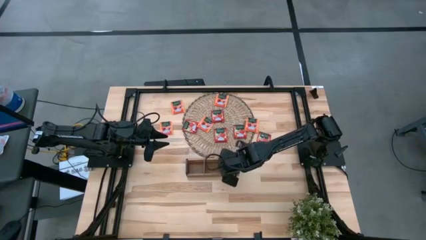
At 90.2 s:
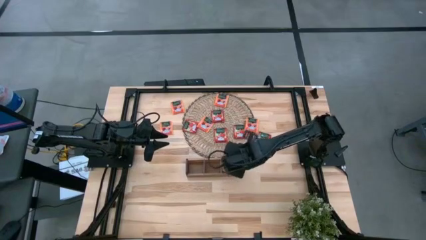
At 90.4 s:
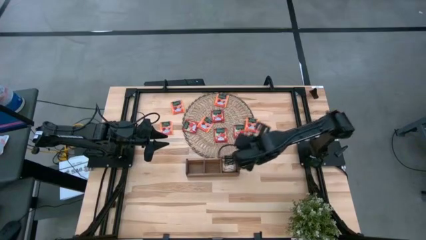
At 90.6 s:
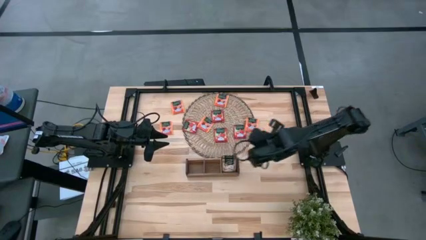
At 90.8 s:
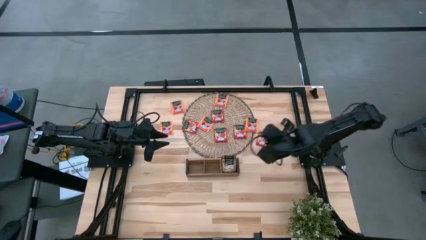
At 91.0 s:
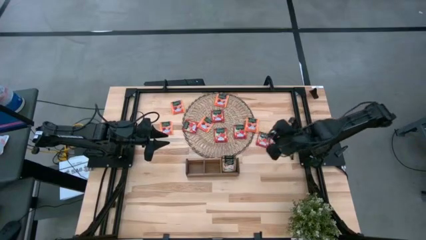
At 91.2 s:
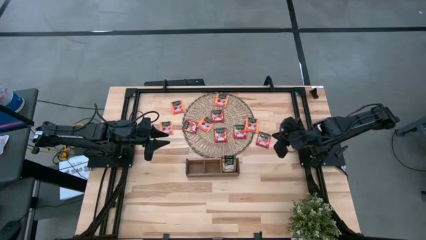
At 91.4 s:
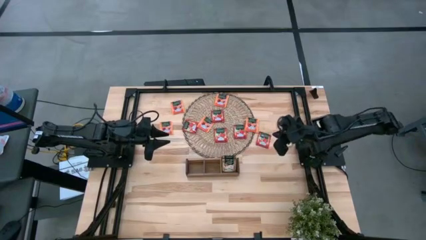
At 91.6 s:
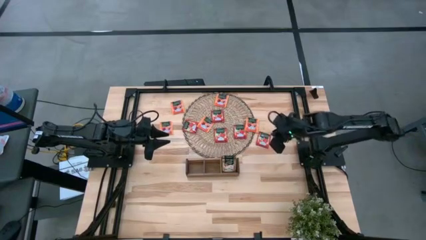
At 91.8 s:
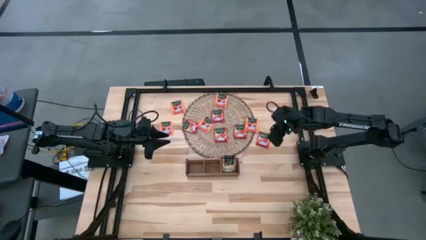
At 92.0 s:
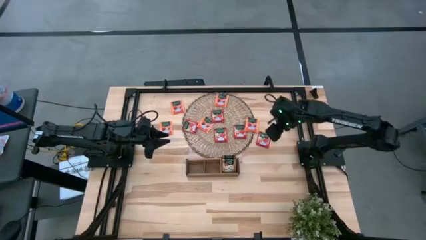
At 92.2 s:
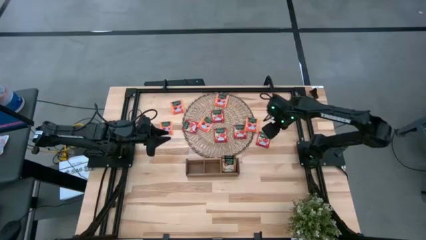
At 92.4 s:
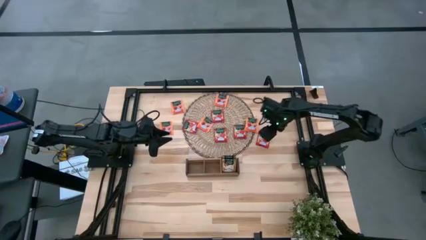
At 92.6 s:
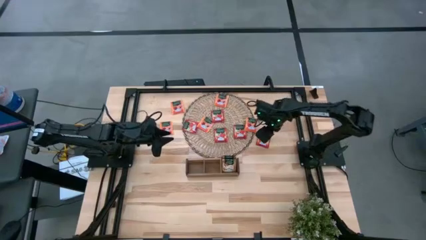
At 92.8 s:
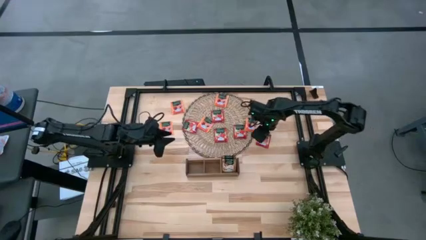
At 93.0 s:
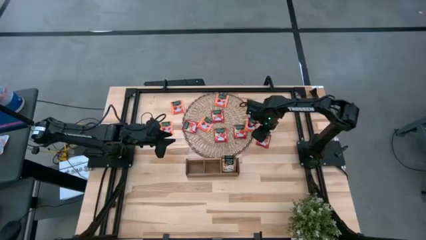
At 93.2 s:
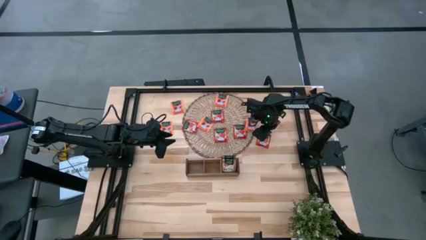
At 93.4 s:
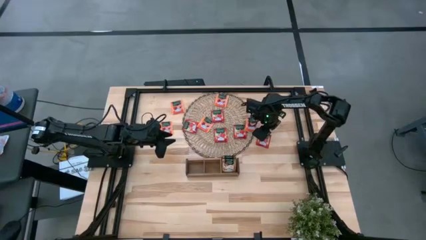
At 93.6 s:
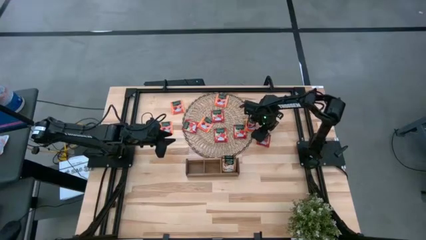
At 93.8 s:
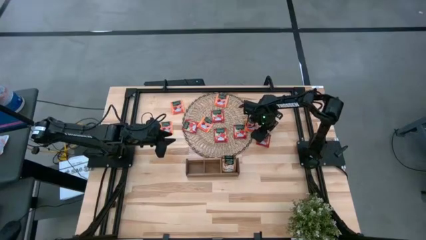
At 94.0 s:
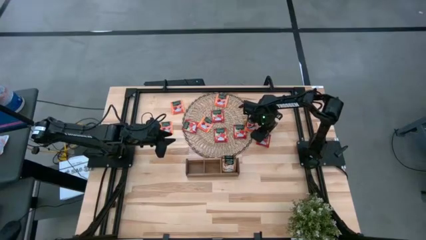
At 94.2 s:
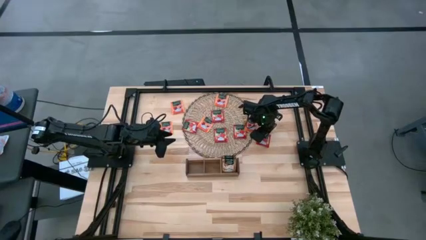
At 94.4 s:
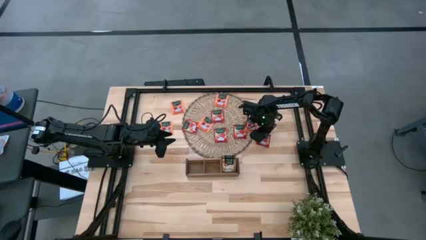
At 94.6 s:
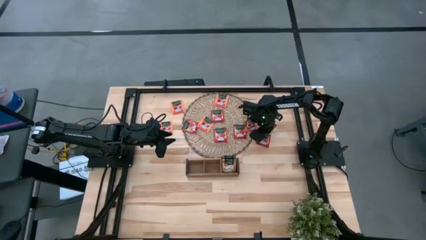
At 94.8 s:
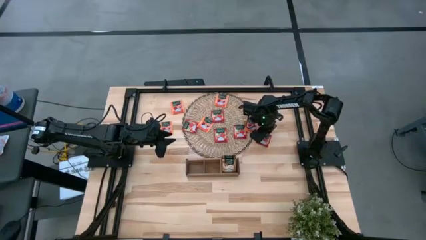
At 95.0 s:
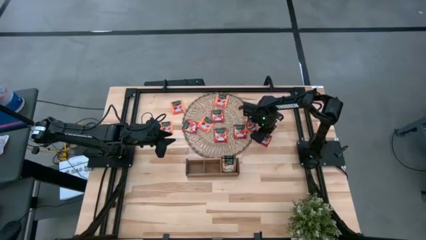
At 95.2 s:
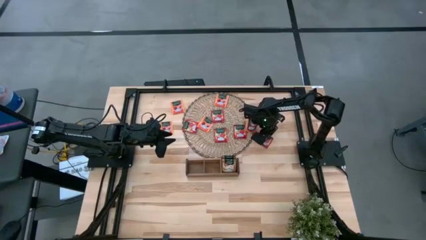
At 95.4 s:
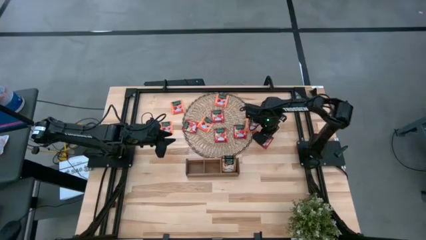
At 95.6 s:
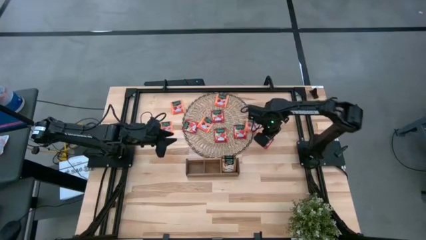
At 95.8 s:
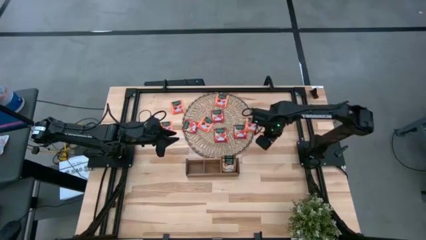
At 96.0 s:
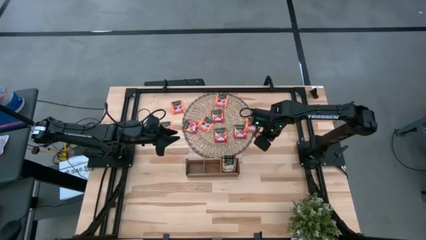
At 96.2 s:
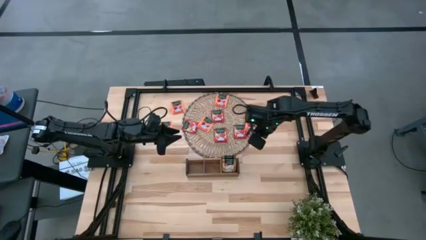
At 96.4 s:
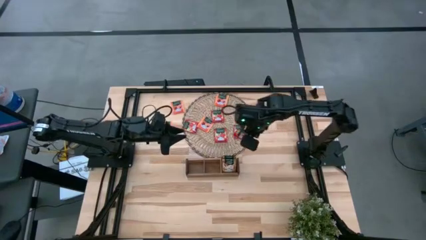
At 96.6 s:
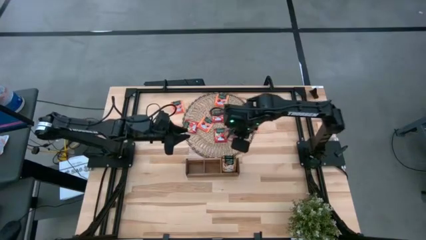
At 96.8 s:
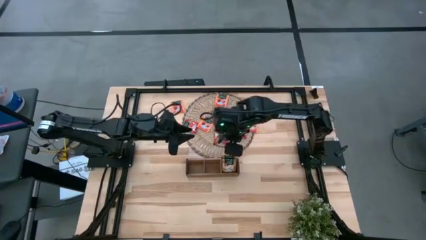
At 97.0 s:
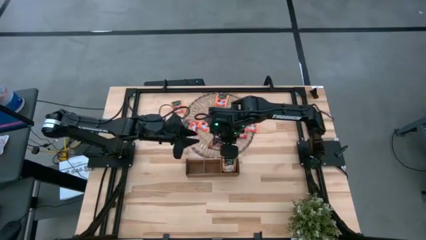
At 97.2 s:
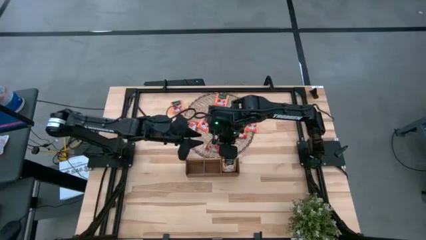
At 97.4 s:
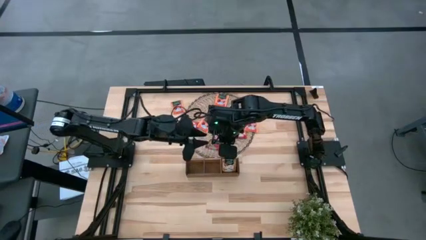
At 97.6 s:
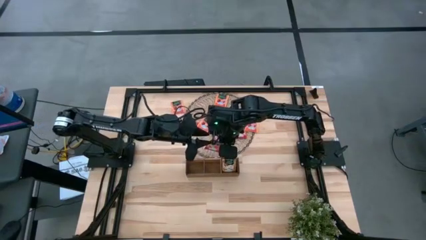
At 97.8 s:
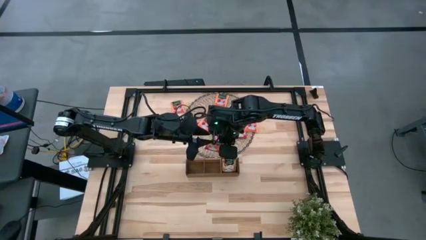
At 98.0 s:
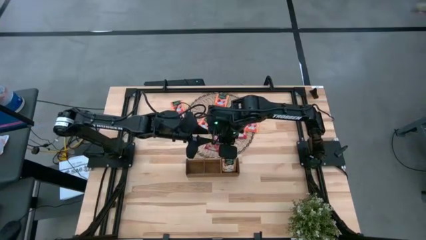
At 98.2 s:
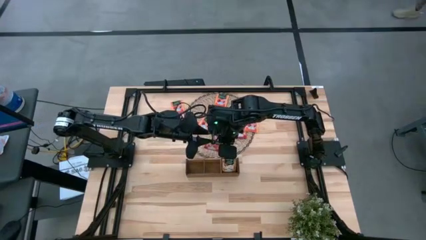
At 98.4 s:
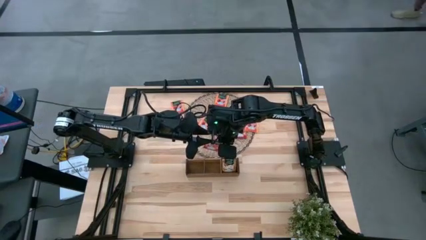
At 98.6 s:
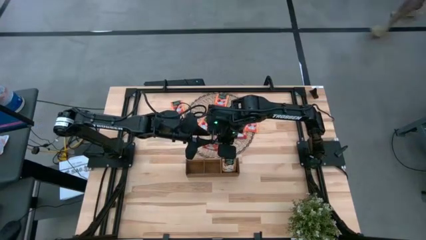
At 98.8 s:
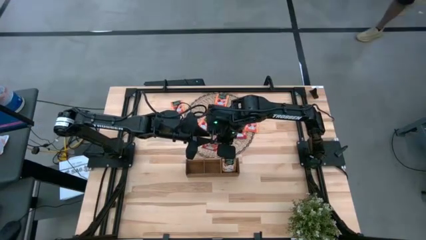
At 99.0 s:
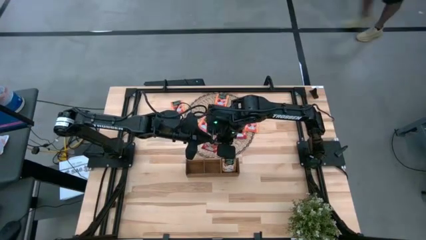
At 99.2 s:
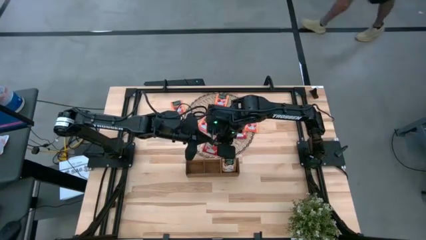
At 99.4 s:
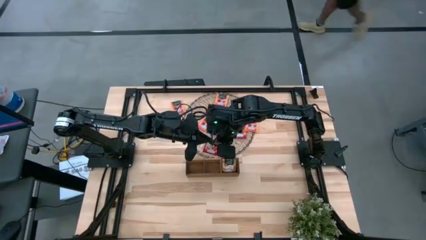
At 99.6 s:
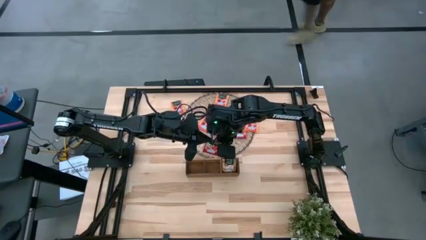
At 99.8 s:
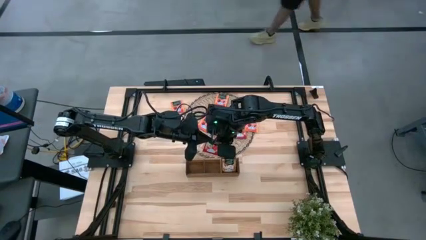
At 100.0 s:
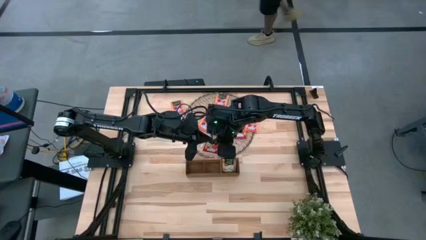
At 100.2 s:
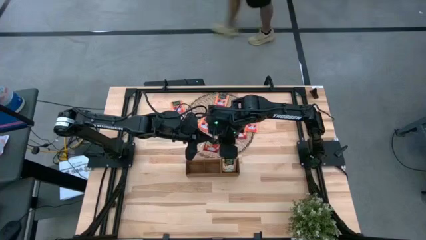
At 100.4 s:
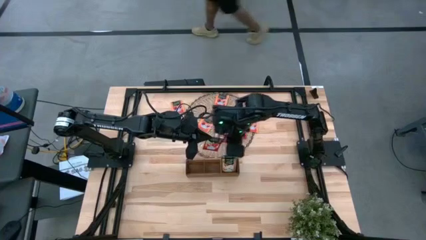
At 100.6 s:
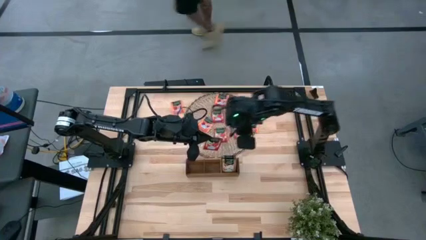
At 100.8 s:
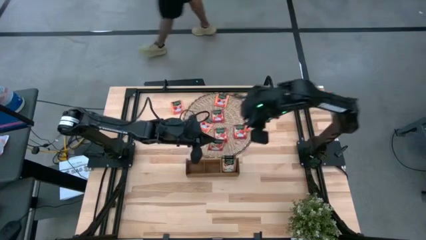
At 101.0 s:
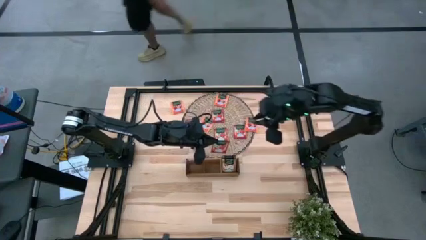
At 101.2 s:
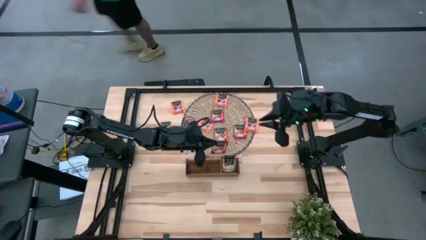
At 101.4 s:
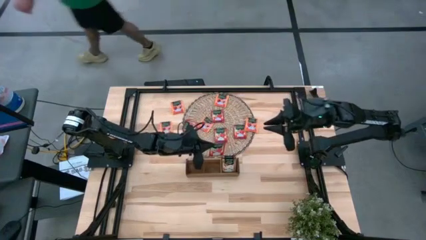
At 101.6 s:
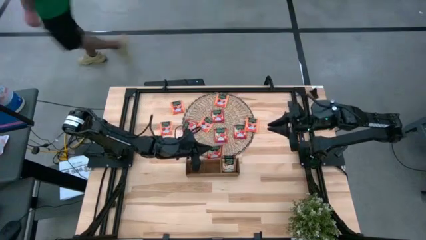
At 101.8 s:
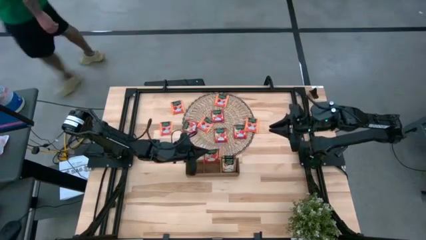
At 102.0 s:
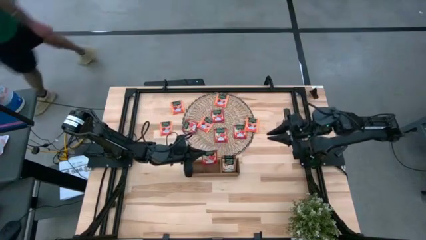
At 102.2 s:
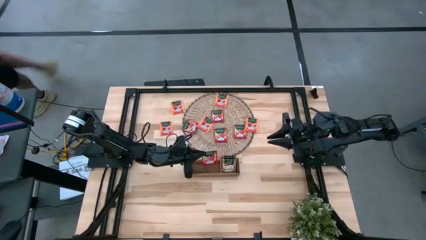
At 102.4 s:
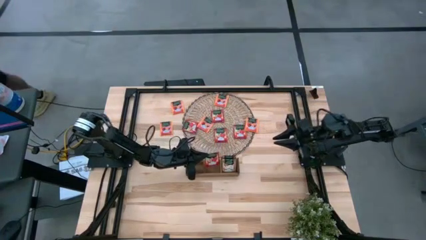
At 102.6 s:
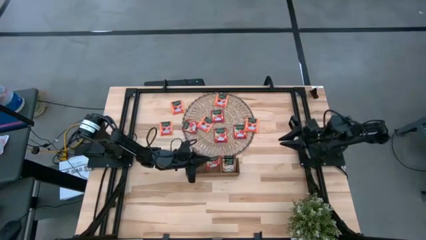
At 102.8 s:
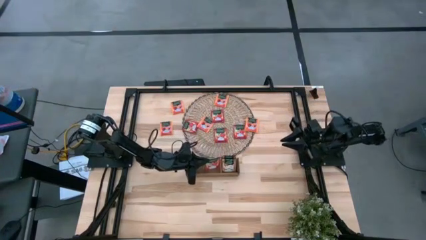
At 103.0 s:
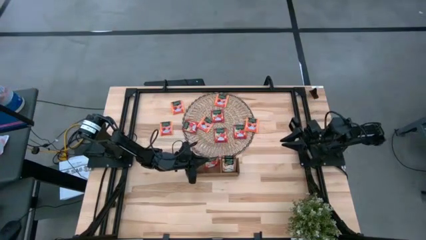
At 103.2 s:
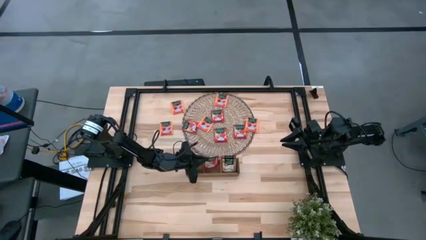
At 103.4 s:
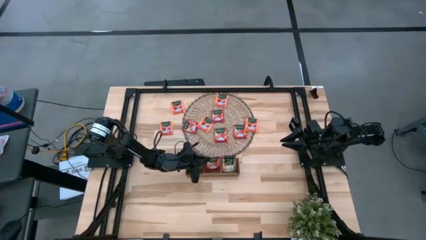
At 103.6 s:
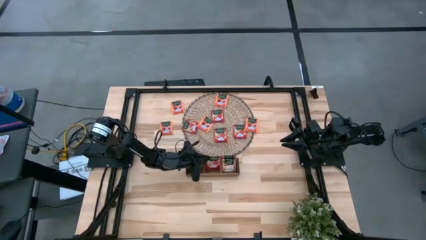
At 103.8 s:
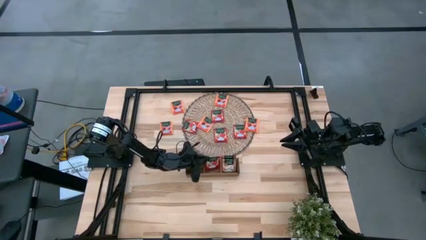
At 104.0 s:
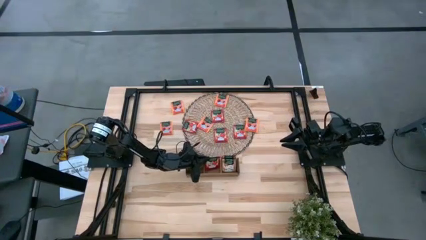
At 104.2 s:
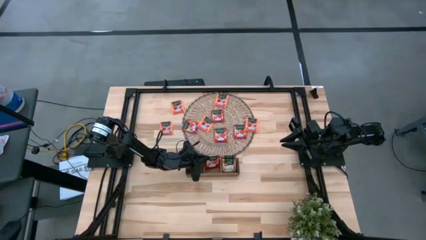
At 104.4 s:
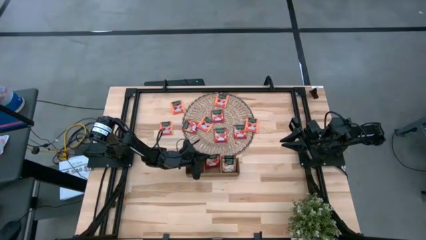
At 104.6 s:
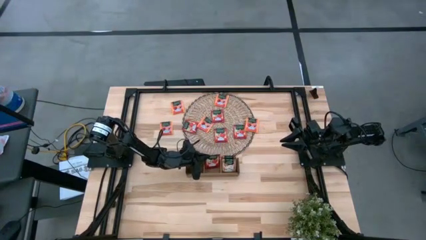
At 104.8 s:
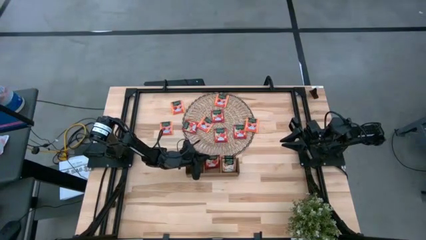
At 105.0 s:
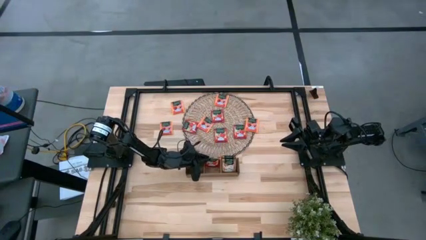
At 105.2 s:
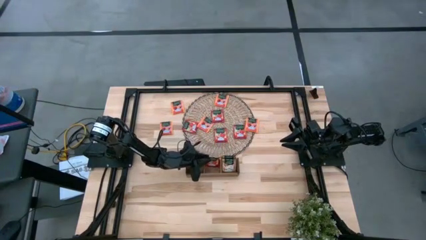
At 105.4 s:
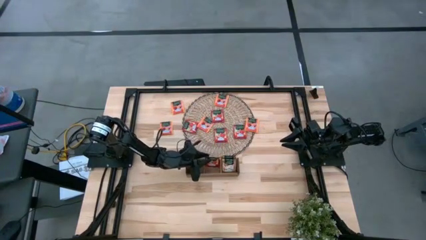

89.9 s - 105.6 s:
Task: Pick & Place Tea
Put the red tea bag into the middle section of the wooden organizer
